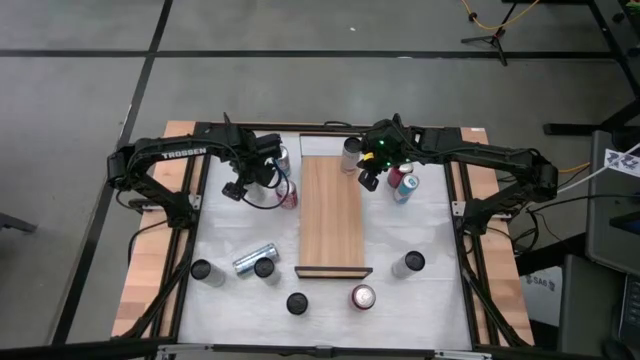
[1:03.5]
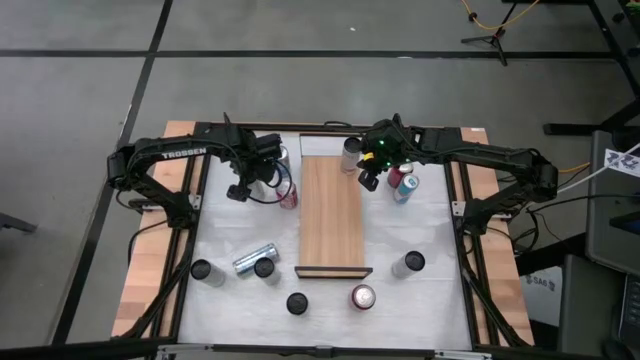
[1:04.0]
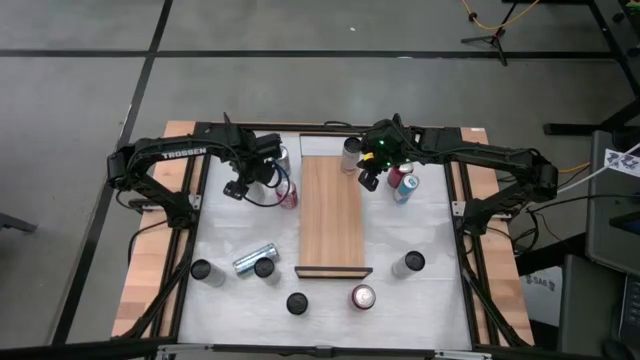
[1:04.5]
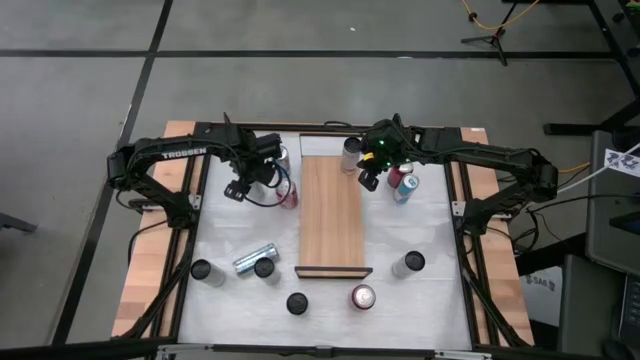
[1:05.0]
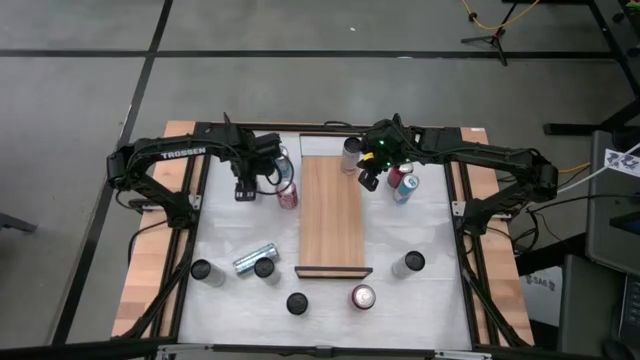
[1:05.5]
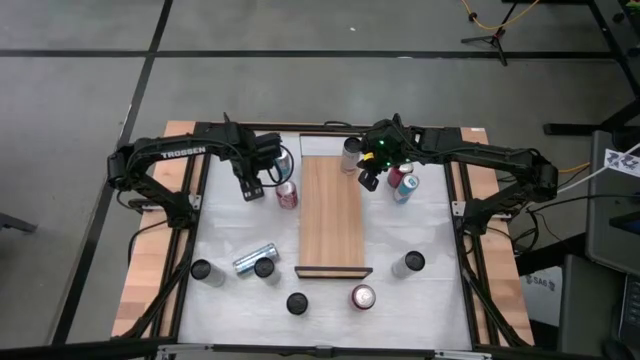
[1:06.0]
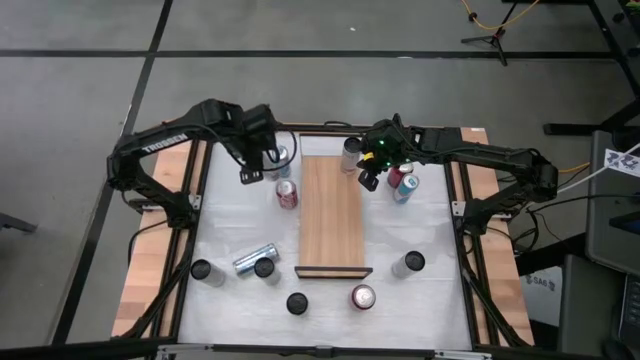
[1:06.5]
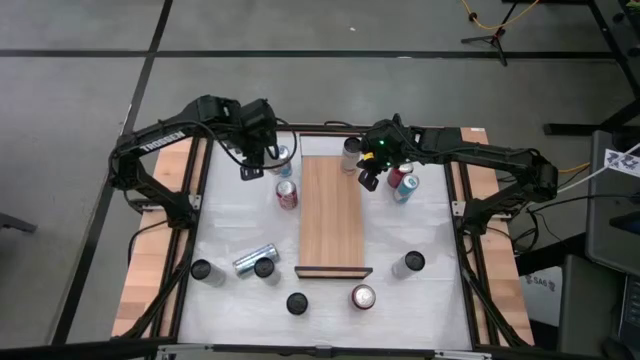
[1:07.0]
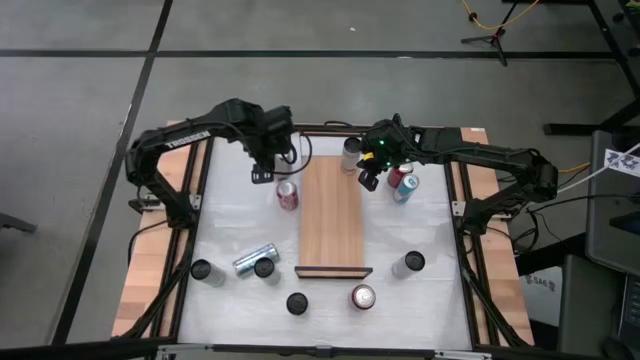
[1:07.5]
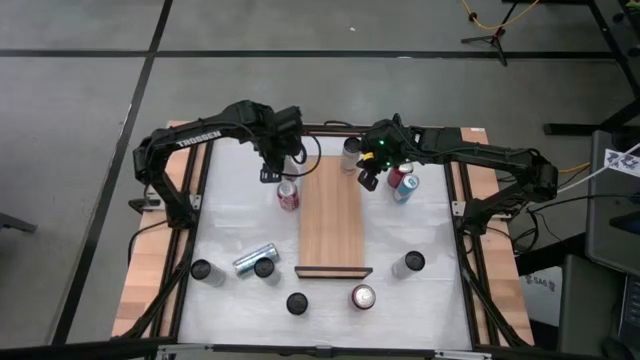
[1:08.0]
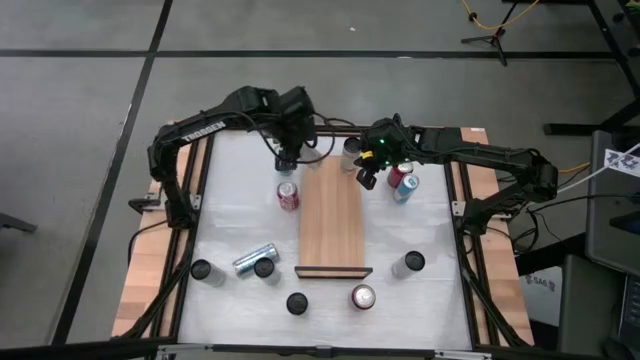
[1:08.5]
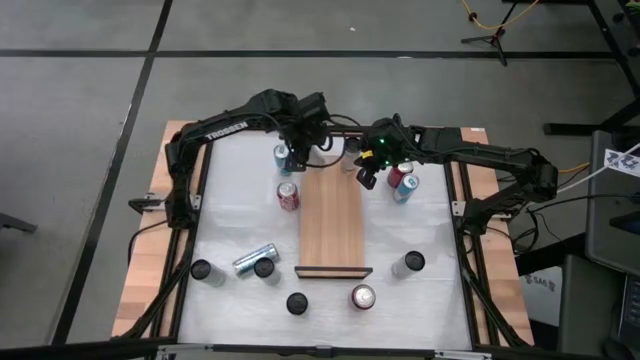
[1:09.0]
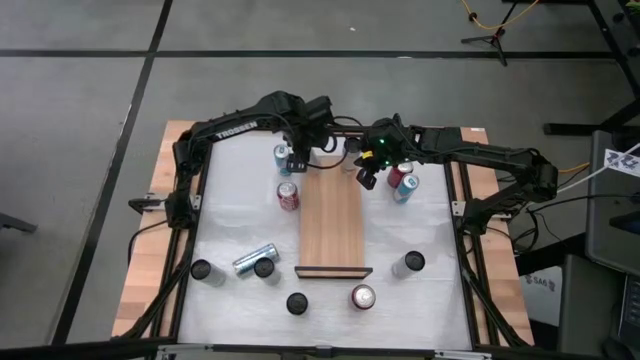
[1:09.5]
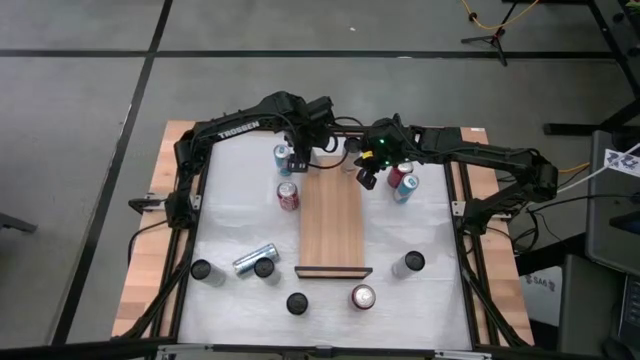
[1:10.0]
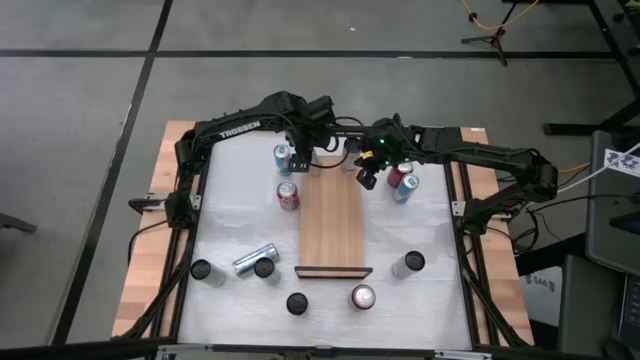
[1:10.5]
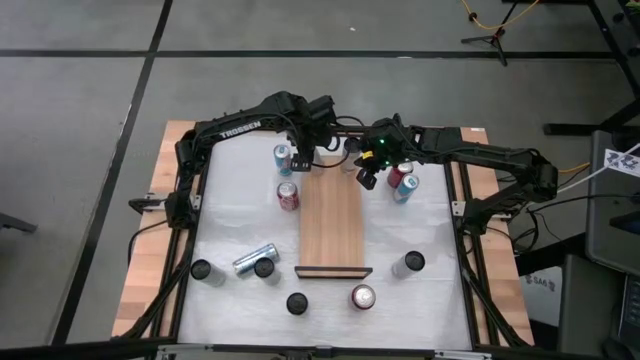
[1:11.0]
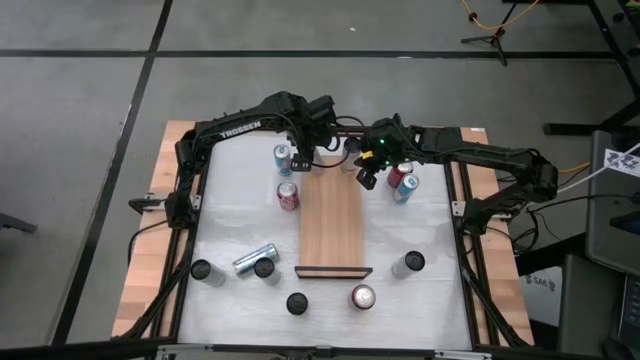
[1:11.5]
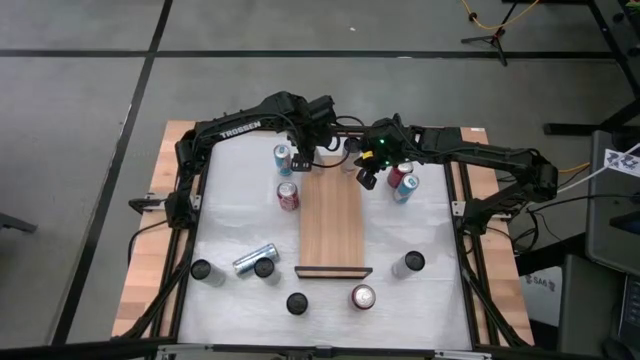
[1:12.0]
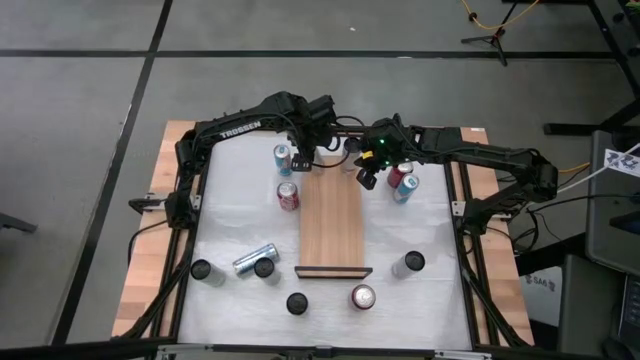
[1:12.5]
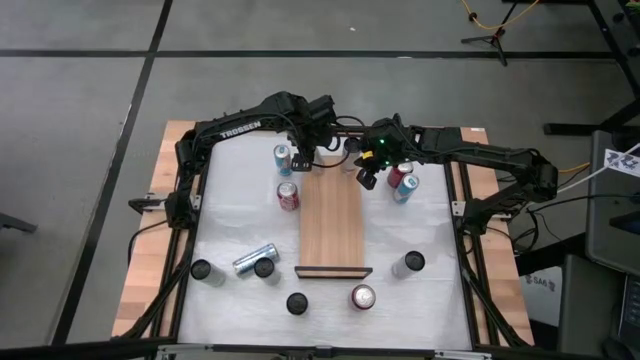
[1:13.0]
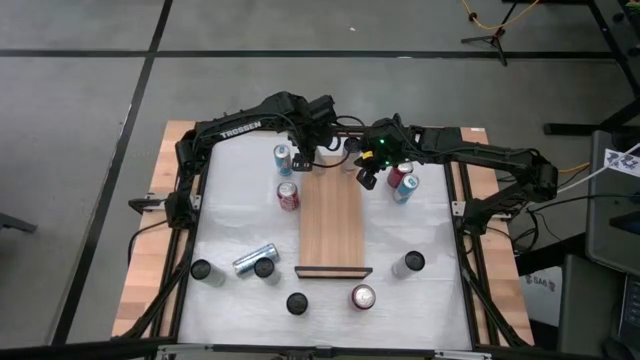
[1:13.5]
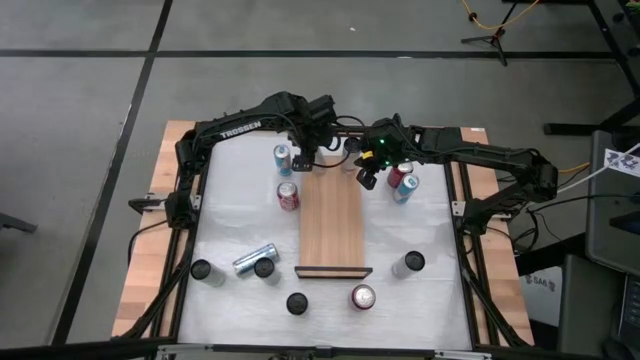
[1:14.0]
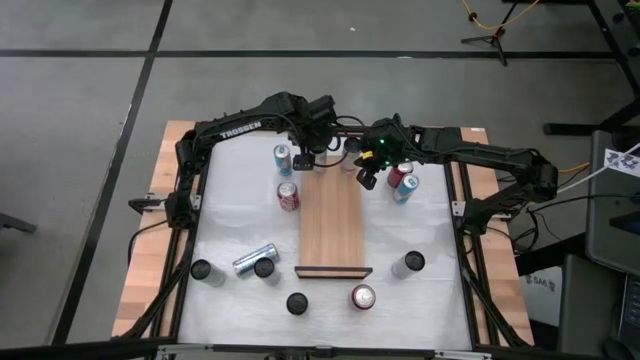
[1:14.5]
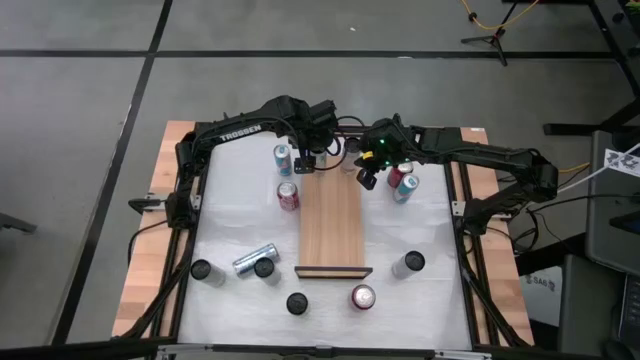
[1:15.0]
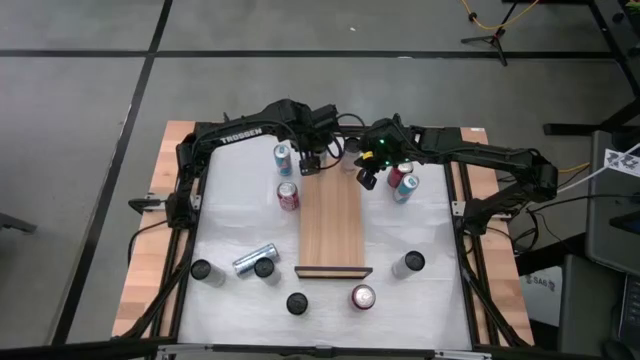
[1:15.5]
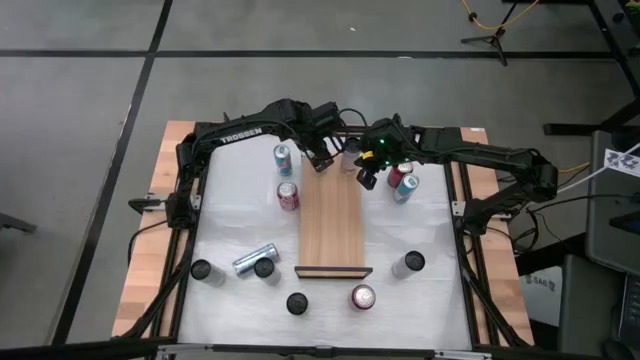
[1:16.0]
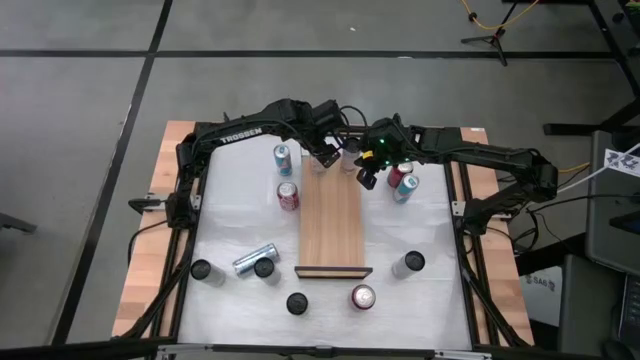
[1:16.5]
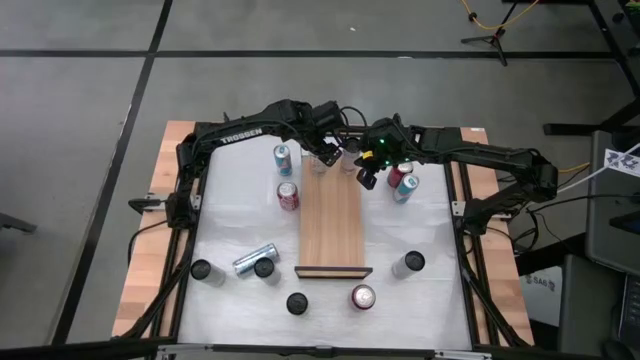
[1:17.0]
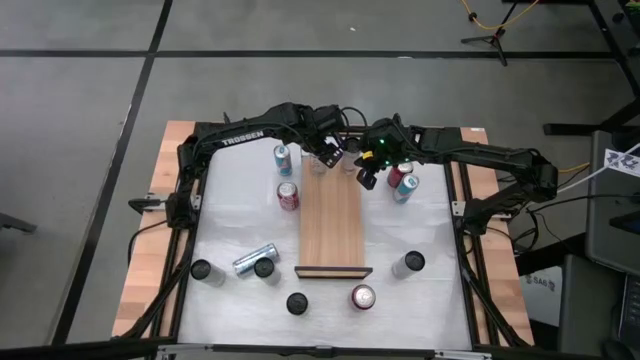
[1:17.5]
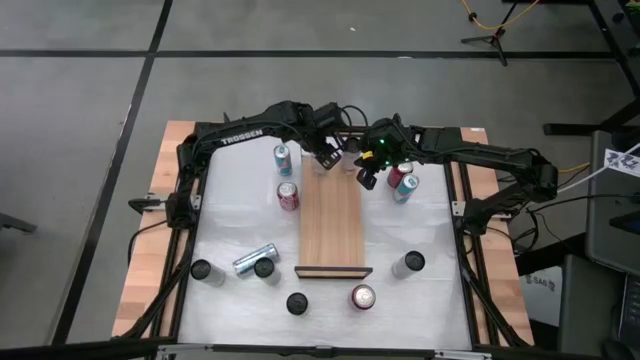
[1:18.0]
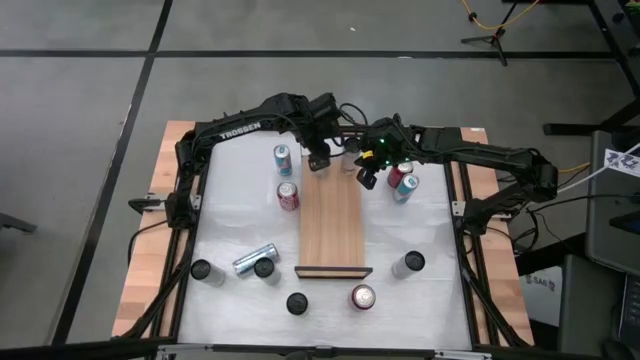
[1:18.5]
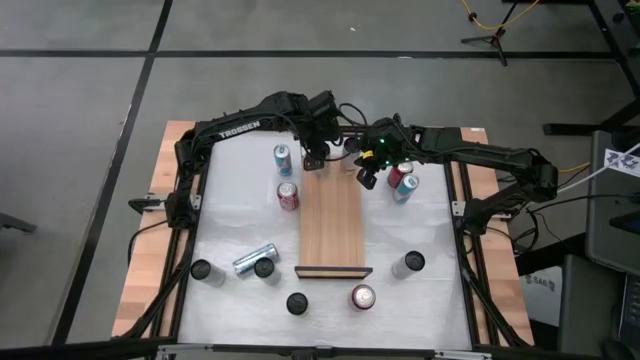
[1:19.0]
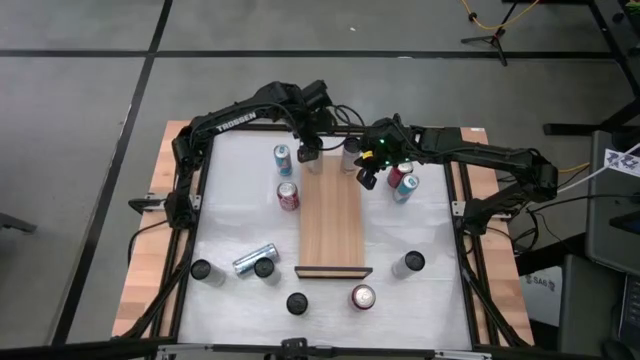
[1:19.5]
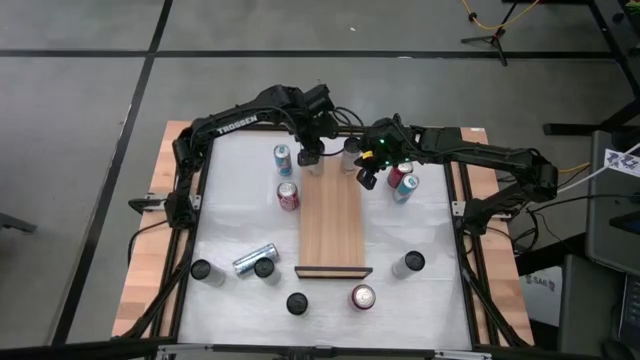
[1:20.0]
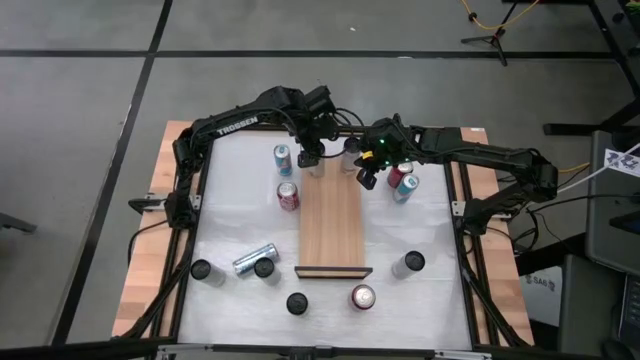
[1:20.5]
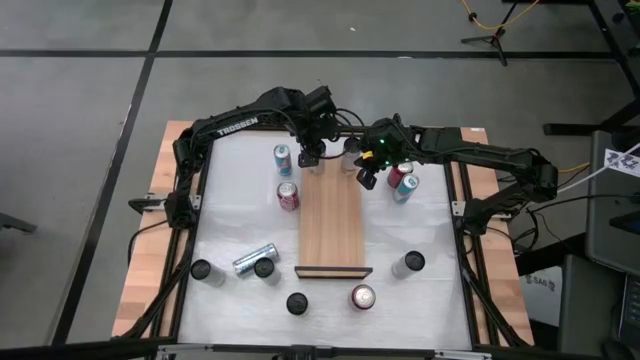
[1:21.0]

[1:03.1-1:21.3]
Task: Place canned beverage on shelf
Put the white pink soda can on the shelf aligned with the other white pink soda can

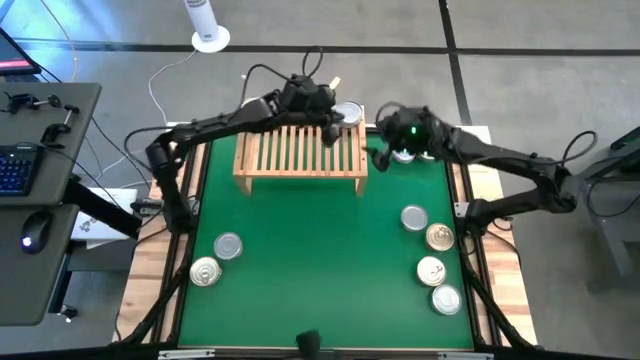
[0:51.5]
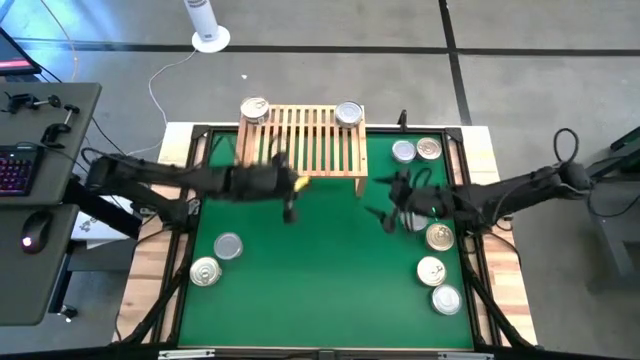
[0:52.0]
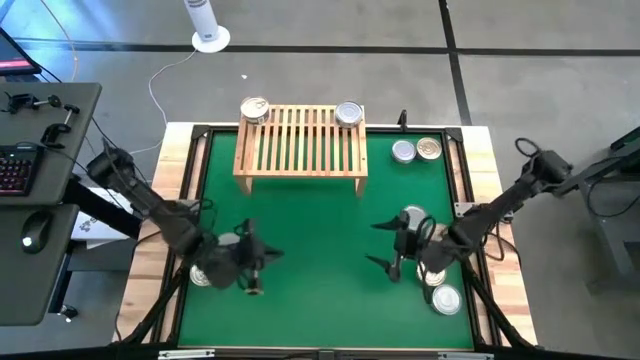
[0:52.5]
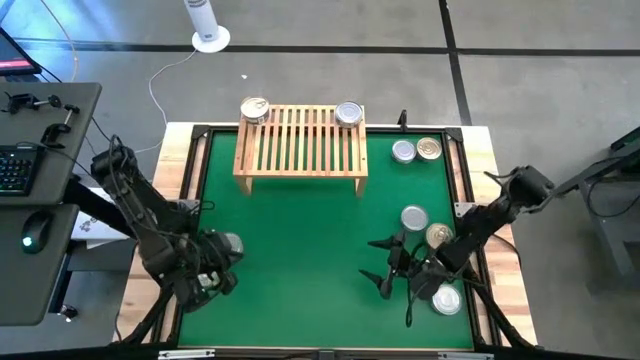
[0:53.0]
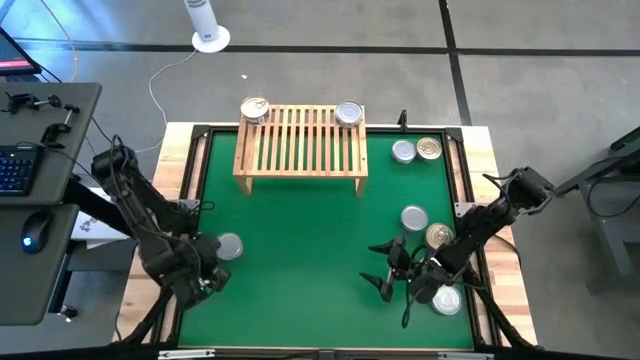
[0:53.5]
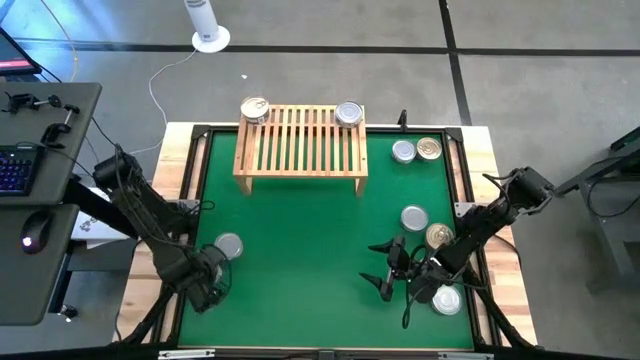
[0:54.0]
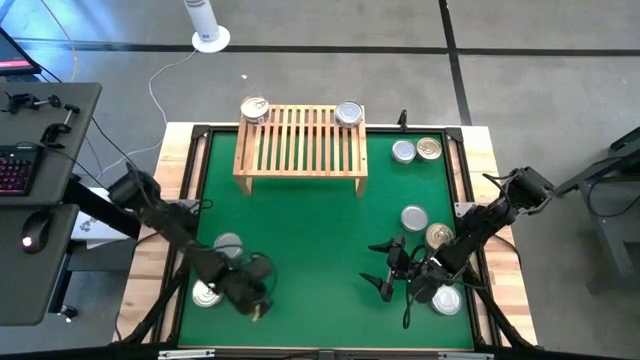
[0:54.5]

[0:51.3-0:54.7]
Task: Stack canned seafood by type on shelf
Put the blue pink tuna can on the shelf
